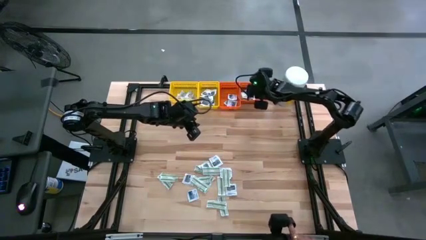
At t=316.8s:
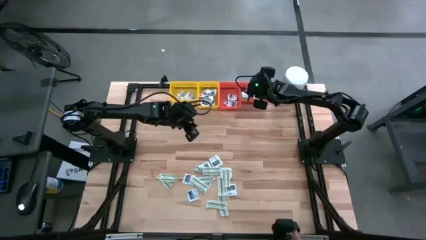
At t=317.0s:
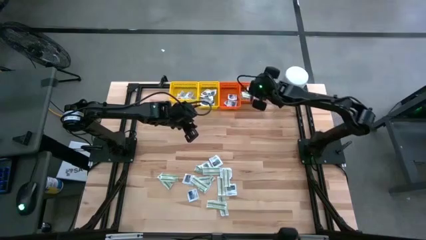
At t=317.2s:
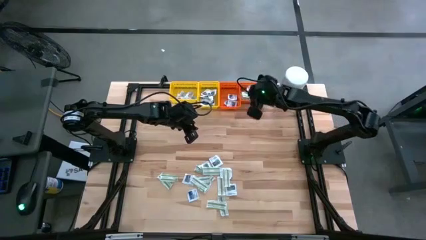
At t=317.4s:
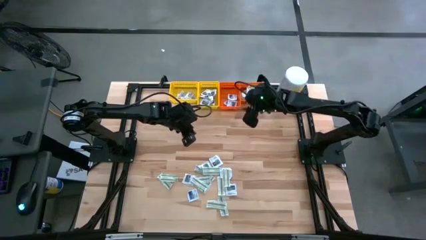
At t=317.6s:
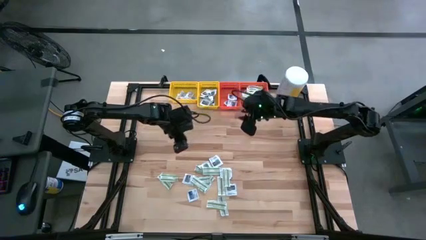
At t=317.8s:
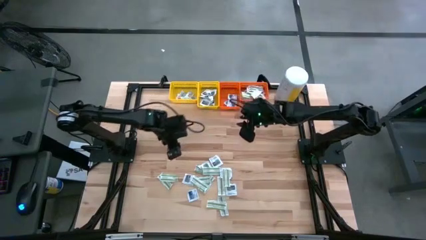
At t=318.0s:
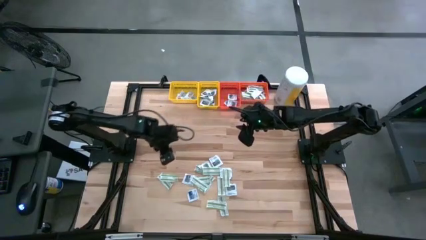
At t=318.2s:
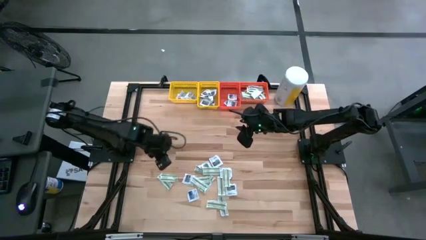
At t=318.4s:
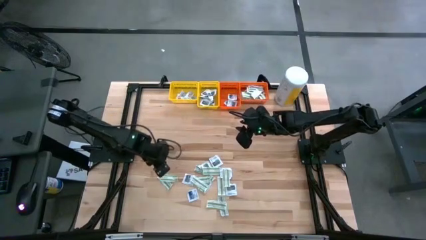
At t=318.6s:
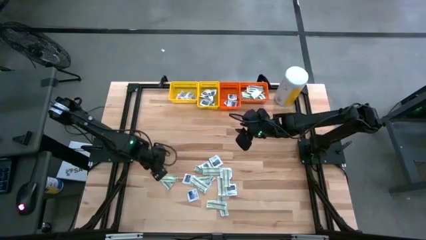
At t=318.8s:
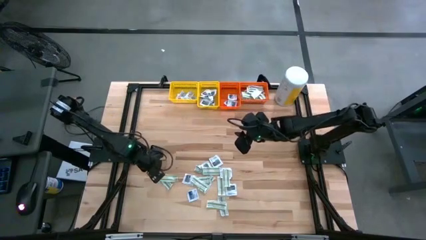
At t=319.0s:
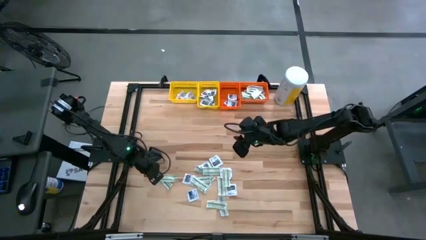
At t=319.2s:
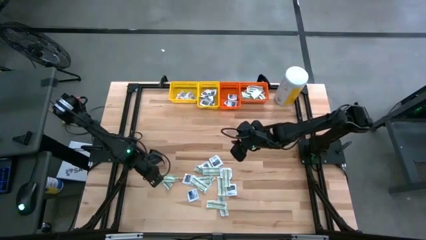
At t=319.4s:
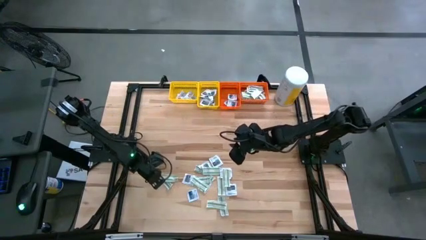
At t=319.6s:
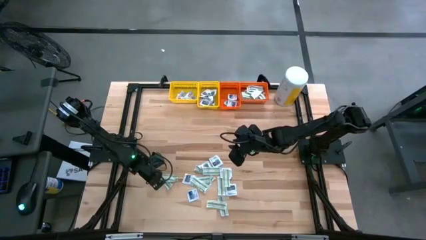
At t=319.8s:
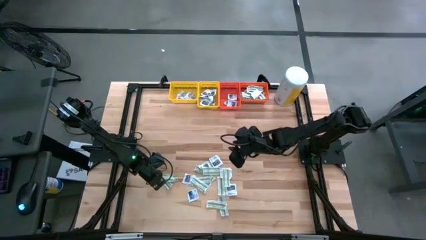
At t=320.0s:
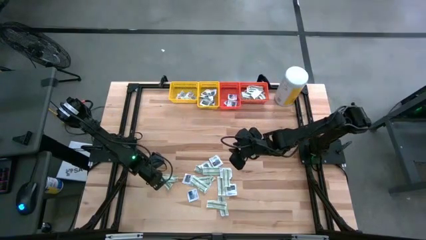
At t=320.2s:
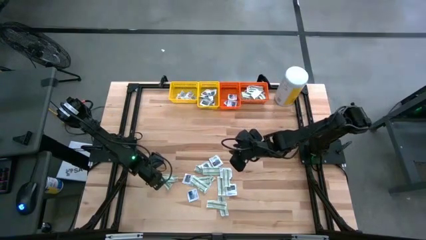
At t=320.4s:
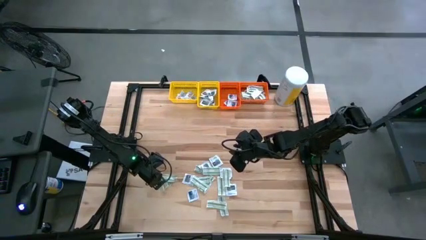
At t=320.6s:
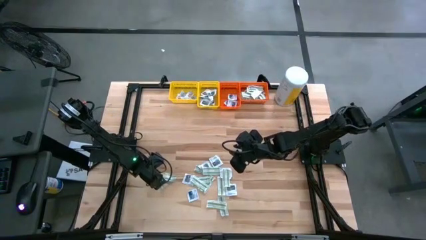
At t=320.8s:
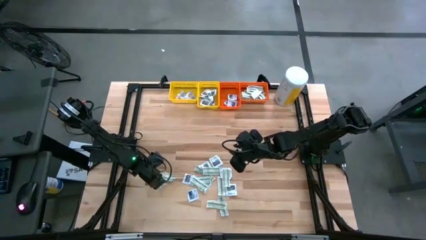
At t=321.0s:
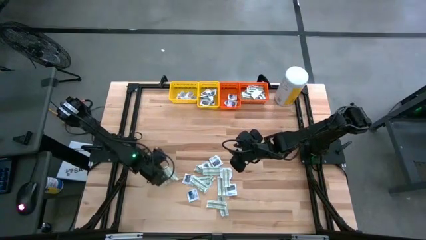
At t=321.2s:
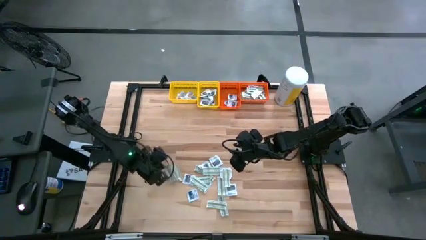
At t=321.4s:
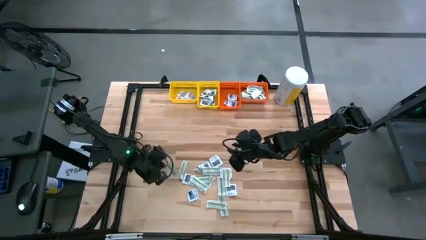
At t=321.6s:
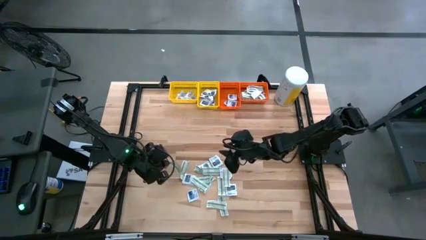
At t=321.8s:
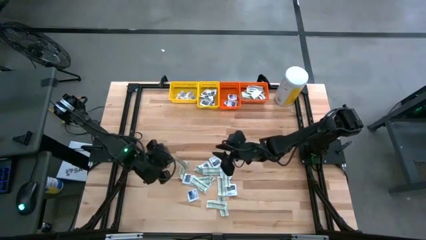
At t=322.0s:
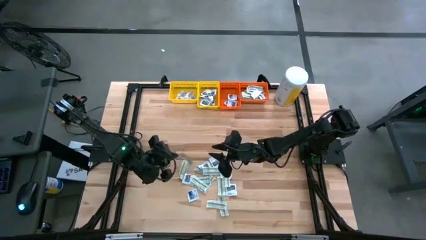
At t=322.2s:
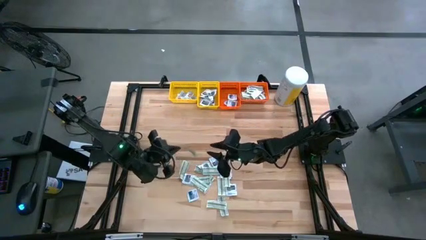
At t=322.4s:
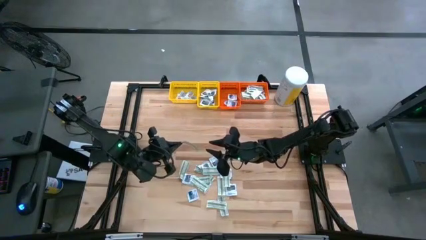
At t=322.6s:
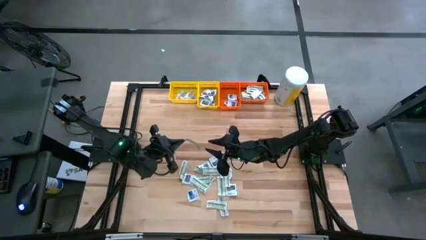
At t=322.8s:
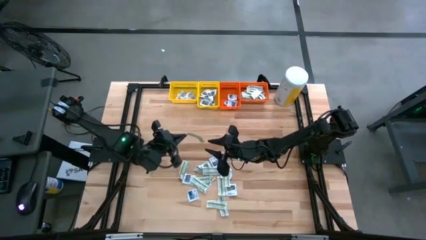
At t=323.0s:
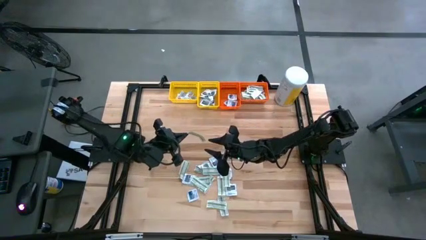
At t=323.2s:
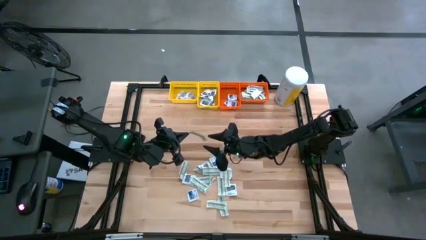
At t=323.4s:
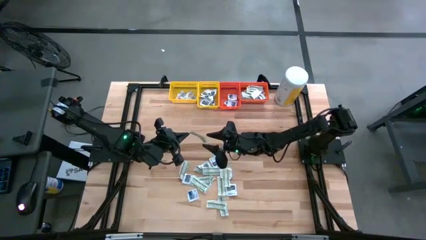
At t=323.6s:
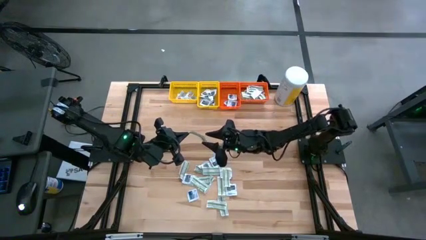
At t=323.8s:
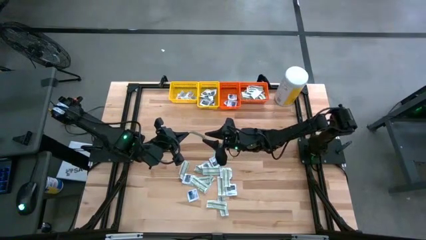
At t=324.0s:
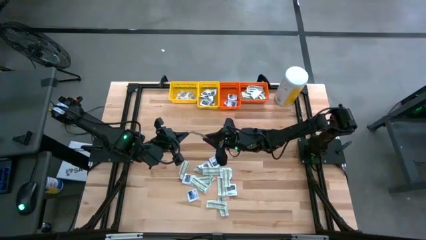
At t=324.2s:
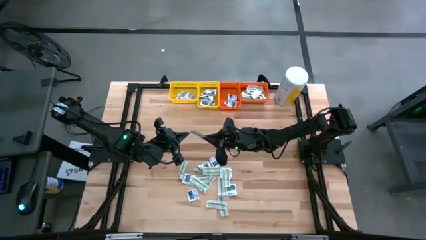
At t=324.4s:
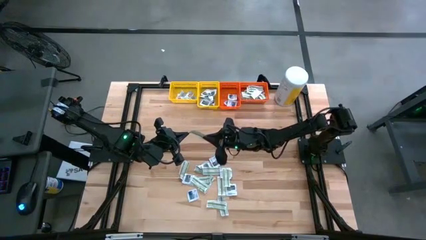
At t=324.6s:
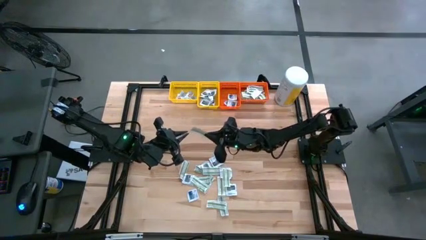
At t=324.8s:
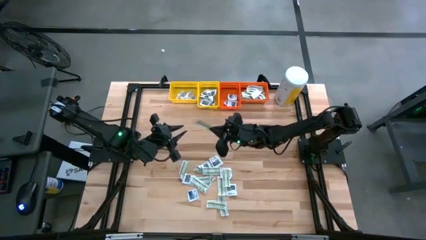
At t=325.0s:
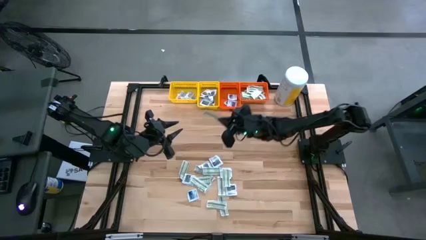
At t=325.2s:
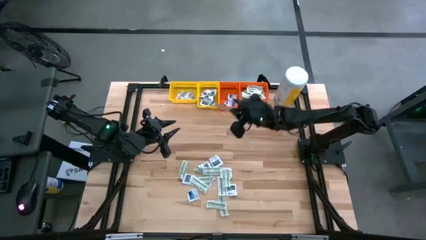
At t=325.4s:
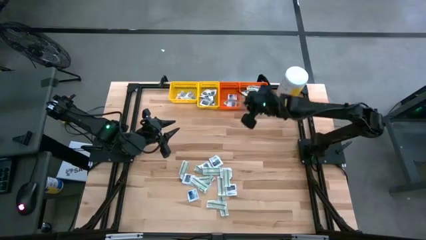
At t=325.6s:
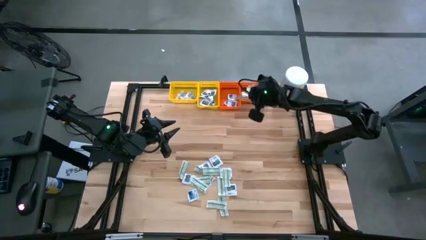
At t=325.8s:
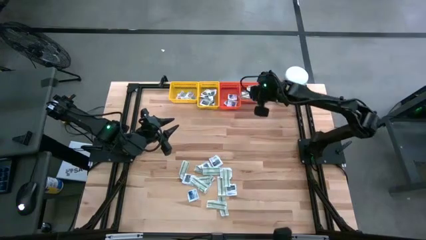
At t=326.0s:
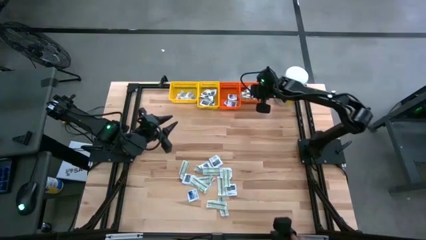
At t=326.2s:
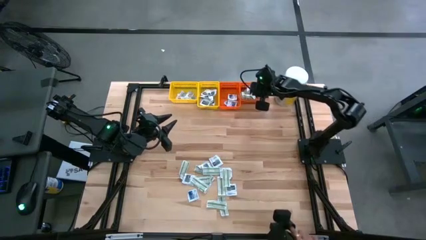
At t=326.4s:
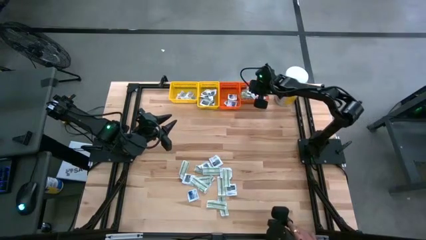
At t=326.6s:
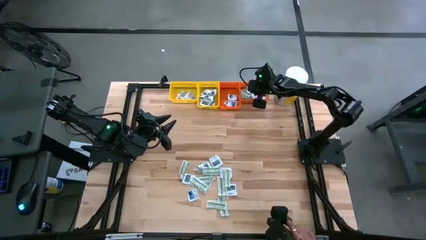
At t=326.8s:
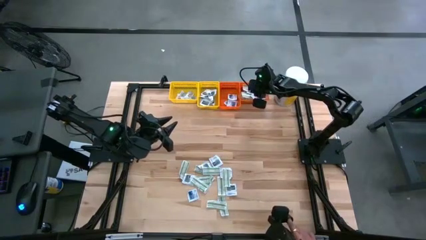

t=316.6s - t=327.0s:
Task: Pick & Place First Aid Supplies
Put the green pad into the right orange bin

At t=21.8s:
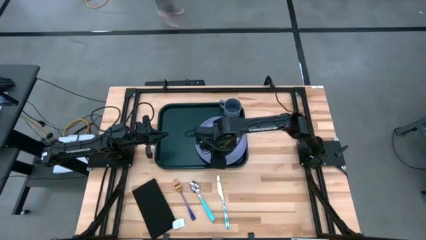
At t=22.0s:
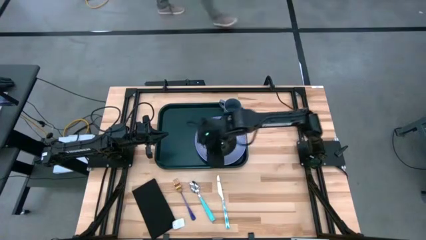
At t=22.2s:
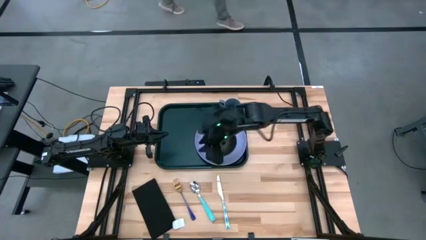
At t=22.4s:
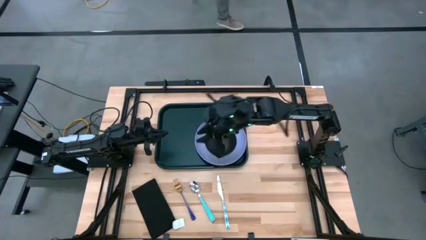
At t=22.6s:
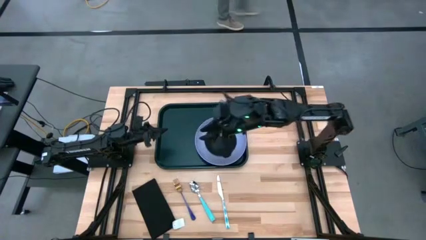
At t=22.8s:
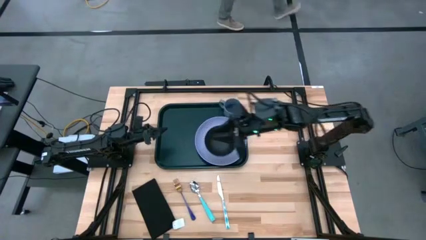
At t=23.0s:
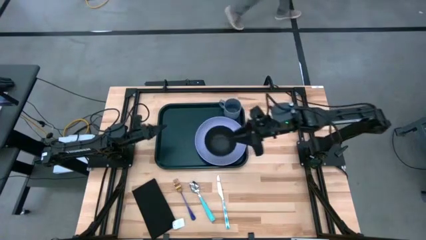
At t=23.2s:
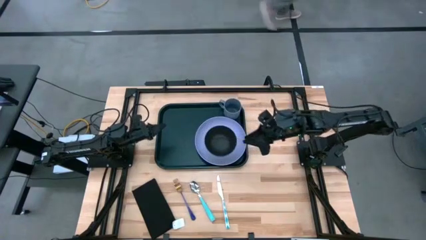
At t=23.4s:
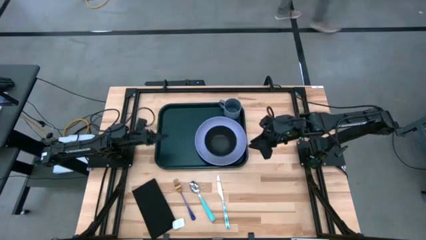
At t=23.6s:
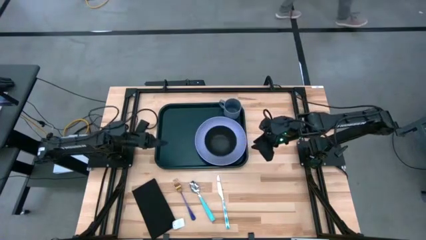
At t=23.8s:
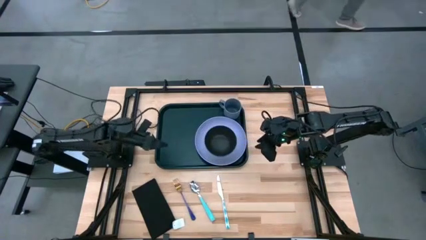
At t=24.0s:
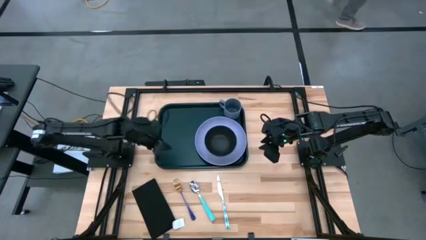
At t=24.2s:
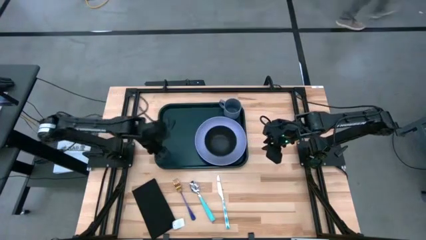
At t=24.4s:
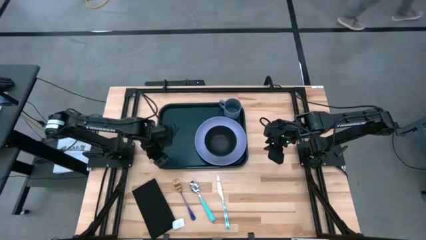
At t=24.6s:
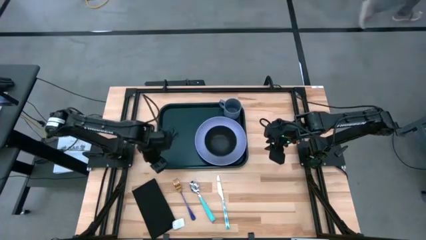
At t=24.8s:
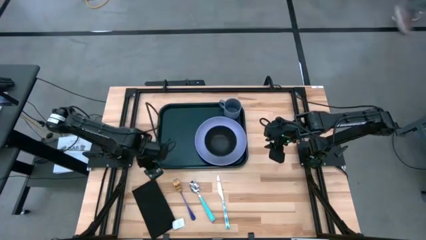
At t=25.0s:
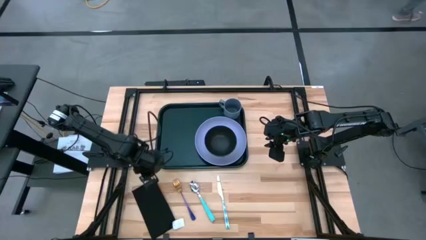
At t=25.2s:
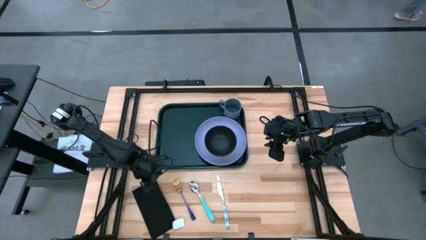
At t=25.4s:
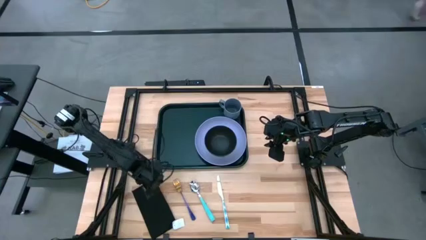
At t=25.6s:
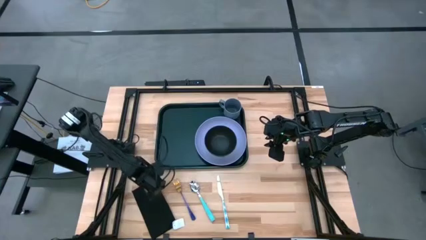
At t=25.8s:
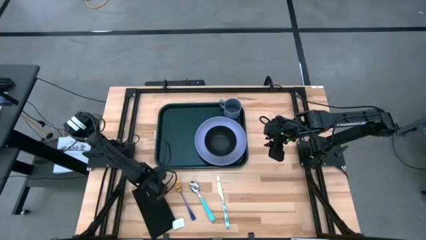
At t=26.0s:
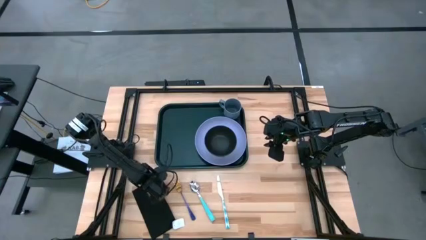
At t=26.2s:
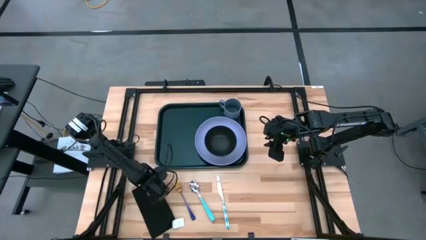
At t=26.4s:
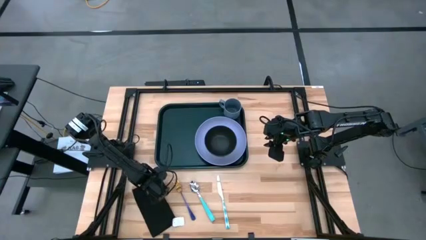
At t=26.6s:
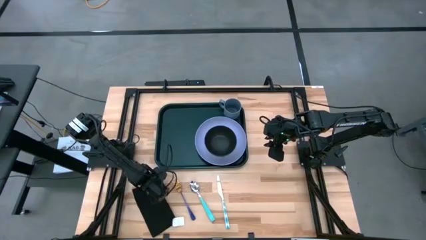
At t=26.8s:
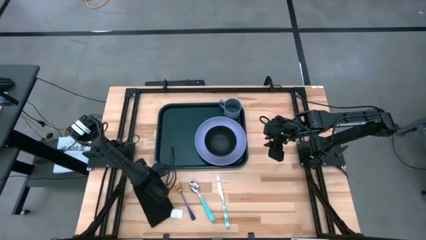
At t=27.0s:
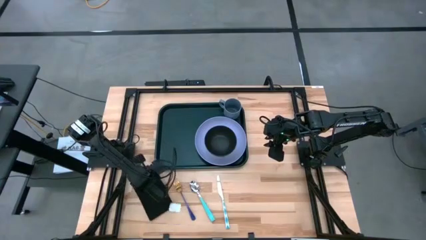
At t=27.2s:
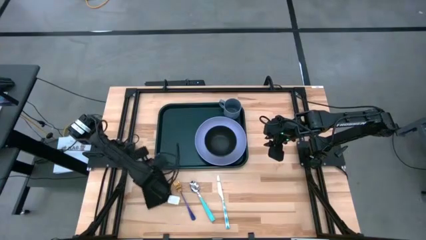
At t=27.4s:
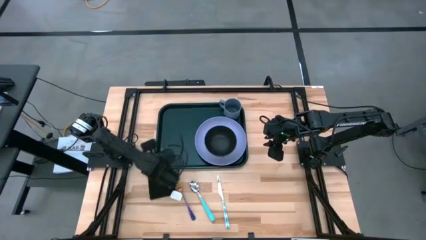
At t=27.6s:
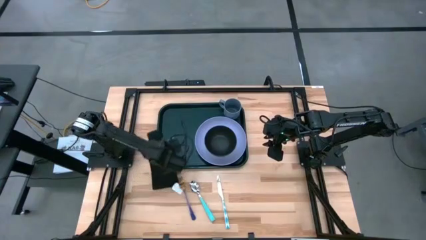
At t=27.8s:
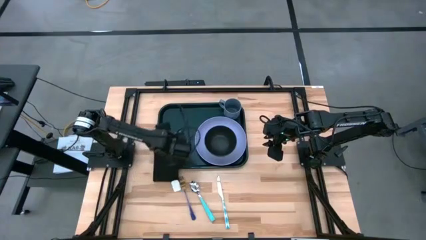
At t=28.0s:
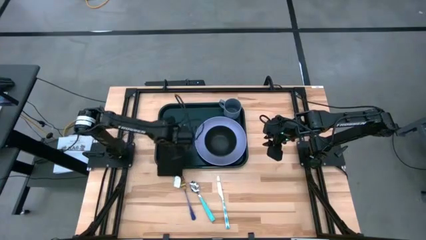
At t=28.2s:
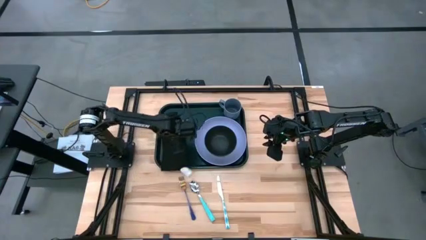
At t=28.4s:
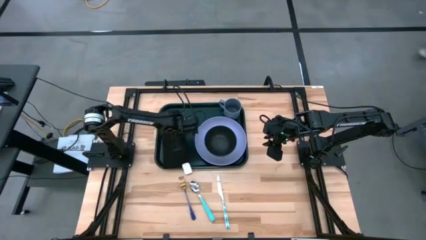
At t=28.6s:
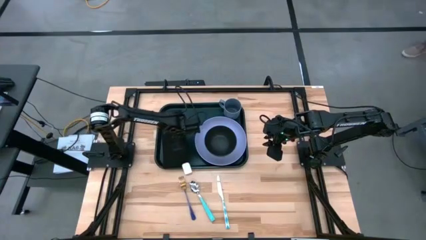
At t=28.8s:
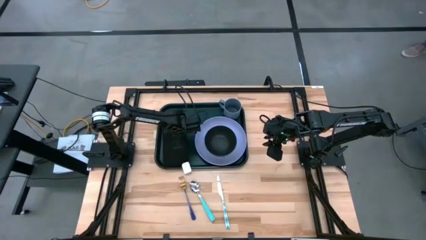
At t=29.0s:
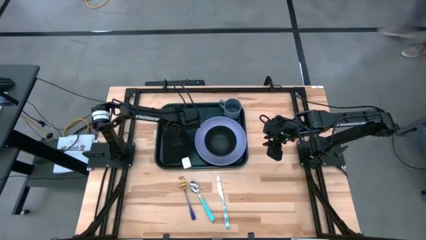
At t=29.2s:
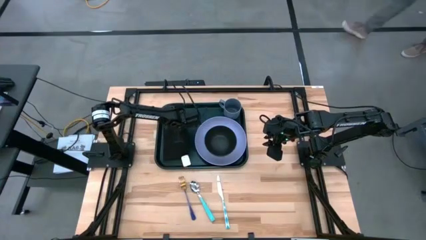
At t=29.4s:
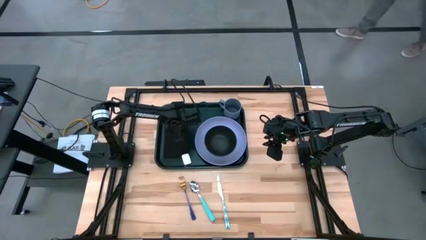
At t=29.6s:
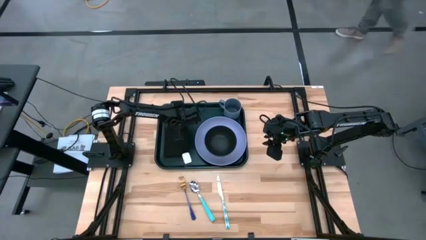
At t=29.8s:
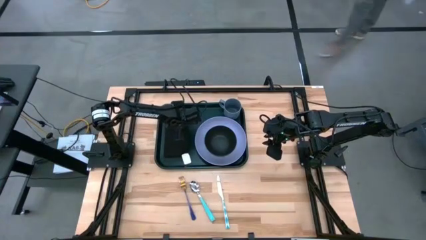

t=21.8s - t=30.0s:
Task: Set up tray
Put the black napkin to the left of the purple plate on the black serving tray
